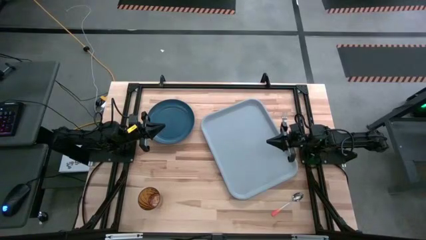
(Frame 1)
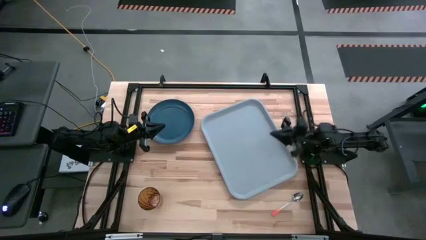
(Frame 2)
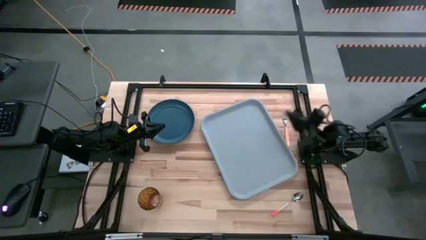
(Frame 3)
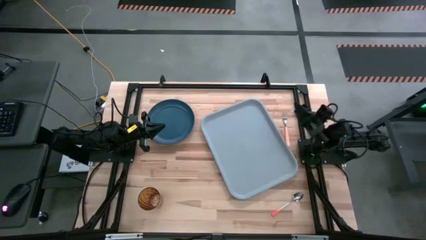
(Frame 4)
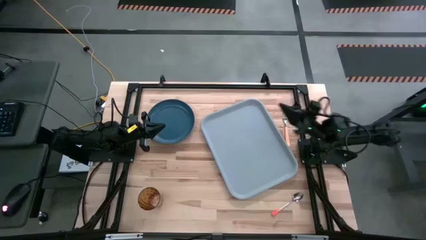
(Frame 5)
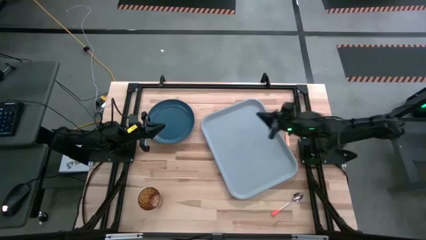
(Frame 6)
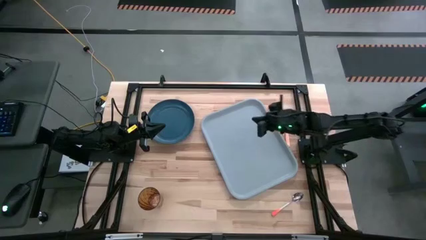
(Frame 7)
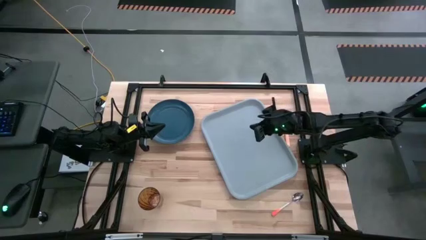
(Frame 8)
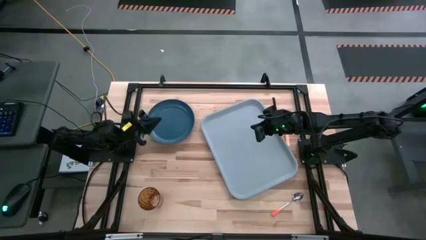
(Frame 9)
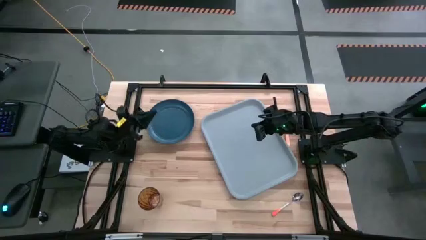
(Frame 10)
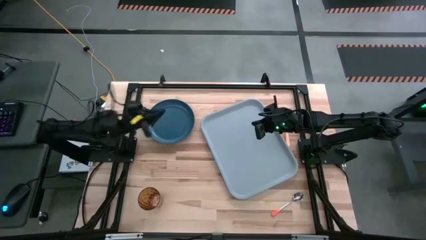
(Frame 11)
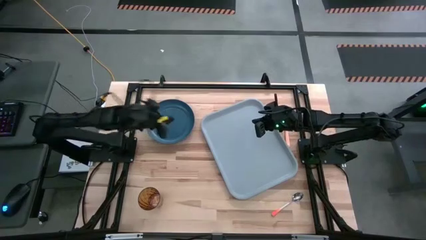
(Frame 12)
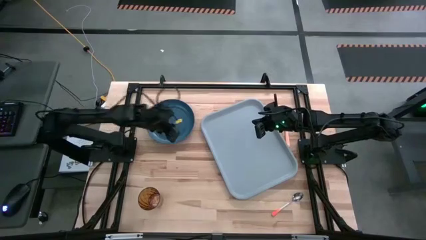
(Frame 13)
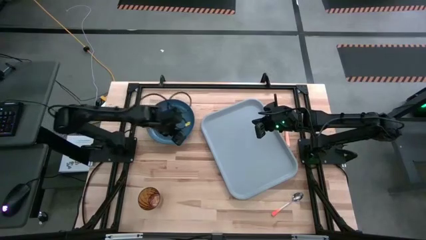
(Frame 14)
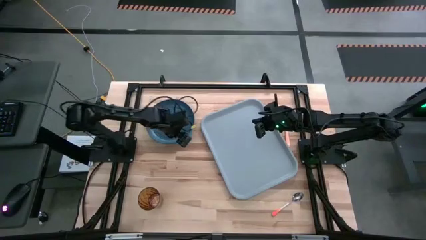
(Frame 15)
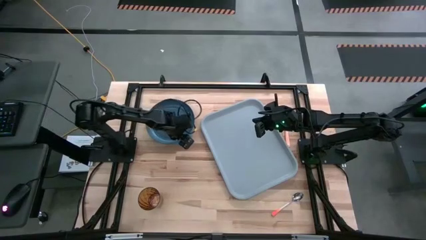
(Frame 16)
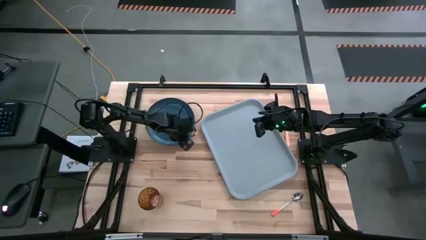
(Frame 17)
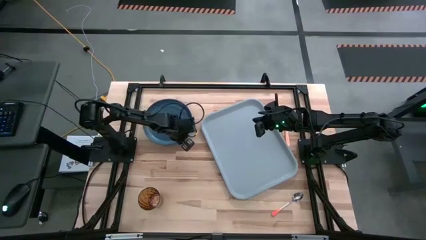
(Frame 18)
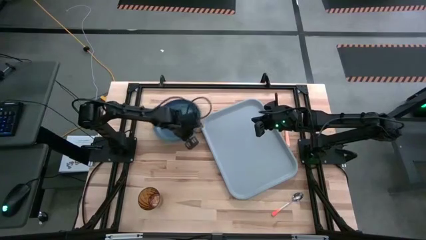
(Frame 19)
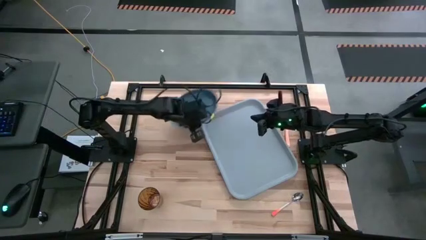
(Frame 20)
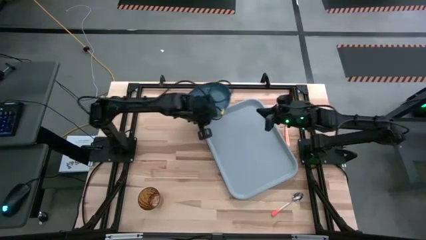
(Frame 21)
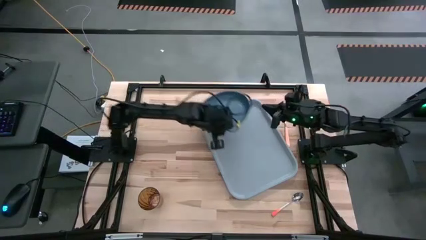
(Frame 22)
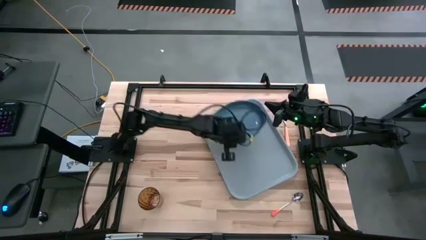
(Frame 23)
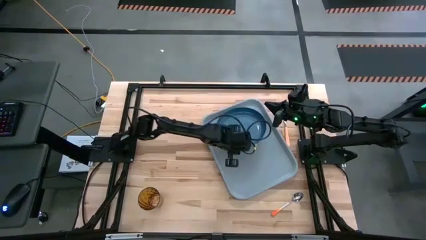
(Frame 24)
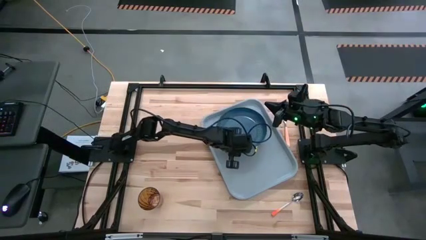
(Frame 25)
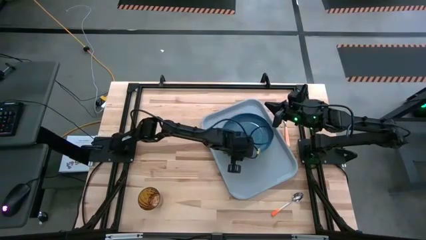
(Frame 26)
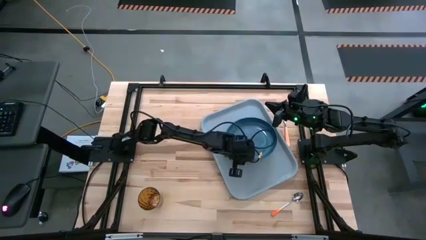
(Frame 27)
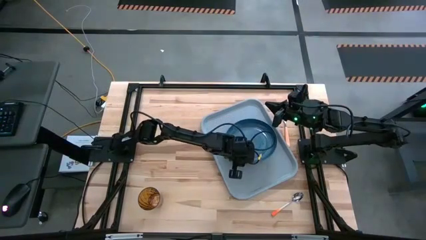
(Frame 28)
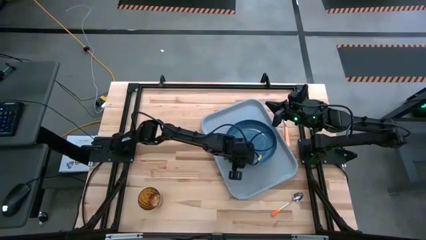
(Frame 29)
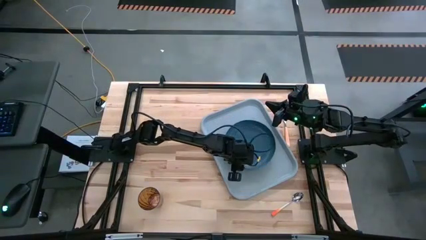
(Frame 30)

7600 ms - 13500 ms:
Task: Pick and place plate/cup/fork/spoon on tray
Put the dark blue plate on the center of the gray tray

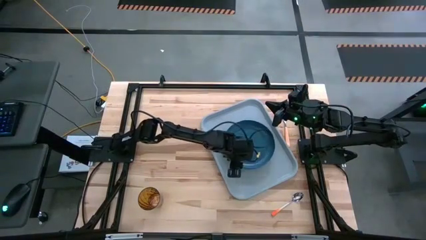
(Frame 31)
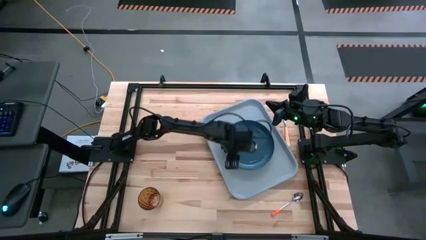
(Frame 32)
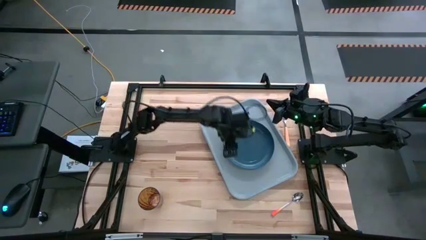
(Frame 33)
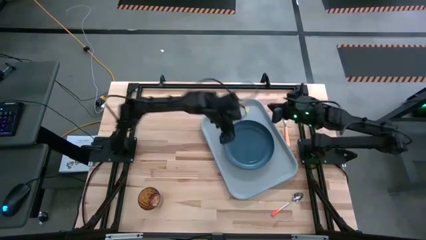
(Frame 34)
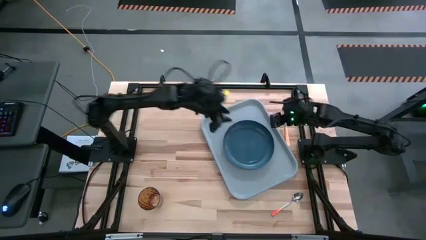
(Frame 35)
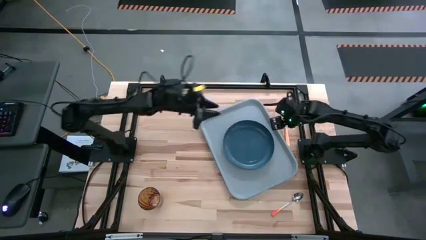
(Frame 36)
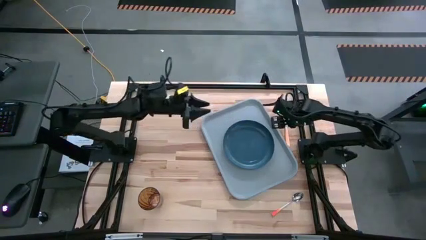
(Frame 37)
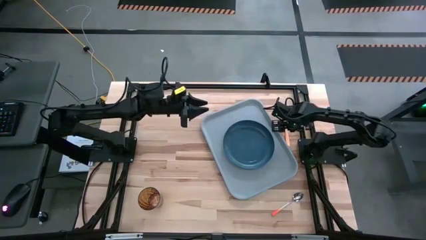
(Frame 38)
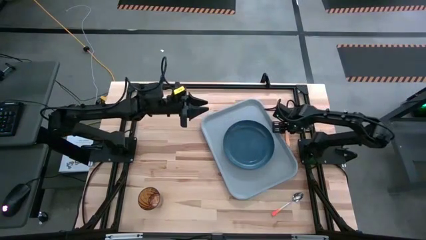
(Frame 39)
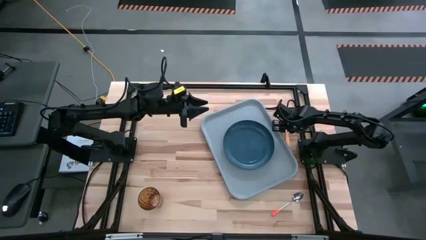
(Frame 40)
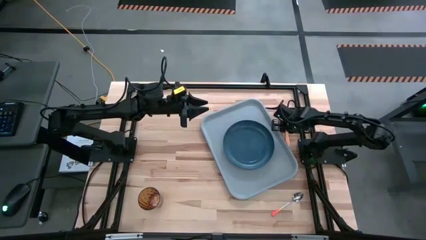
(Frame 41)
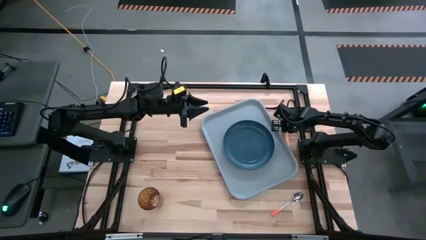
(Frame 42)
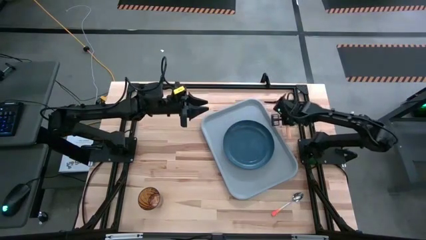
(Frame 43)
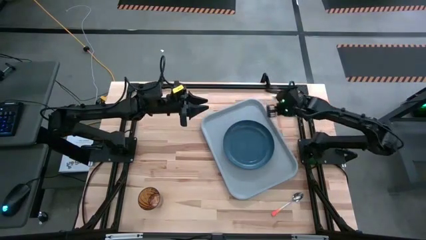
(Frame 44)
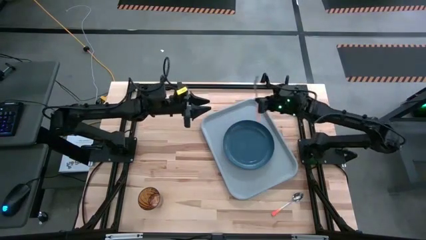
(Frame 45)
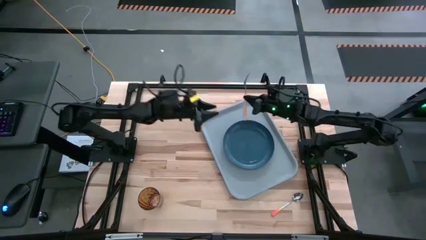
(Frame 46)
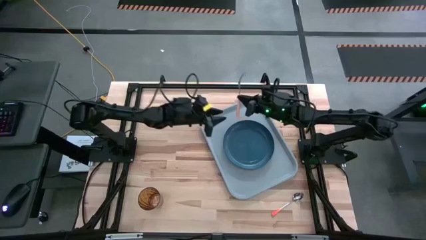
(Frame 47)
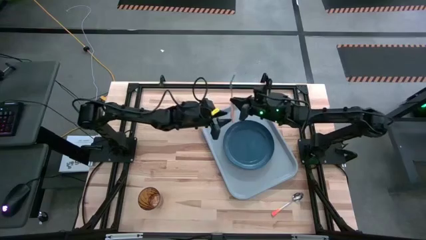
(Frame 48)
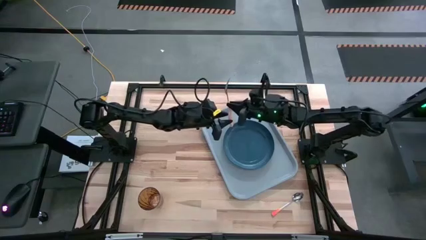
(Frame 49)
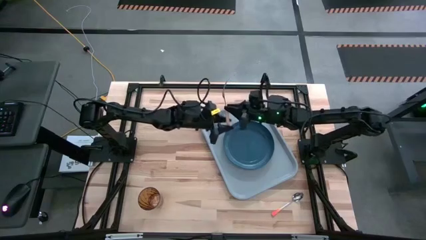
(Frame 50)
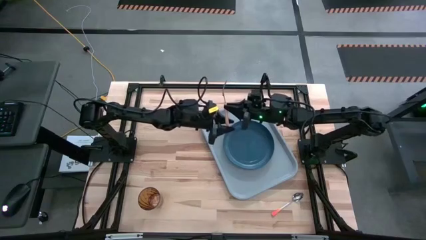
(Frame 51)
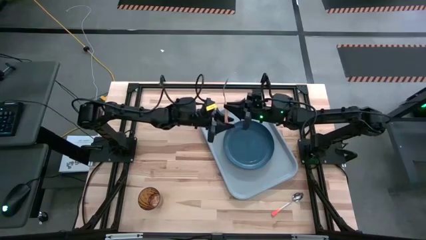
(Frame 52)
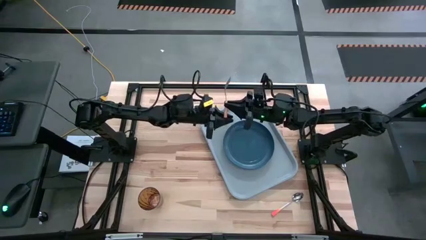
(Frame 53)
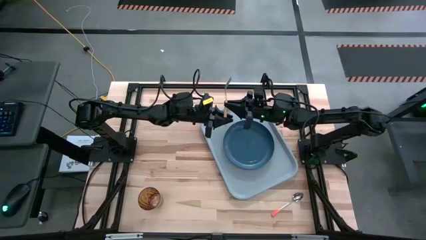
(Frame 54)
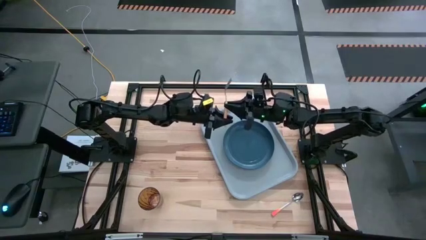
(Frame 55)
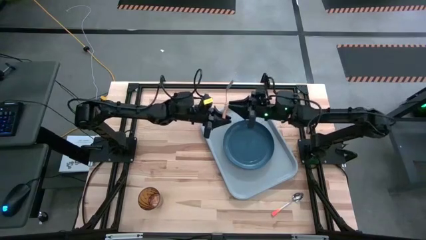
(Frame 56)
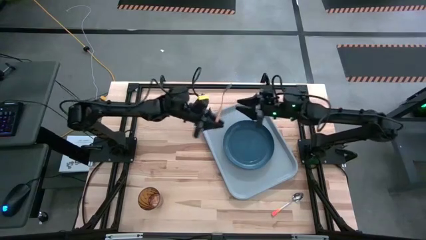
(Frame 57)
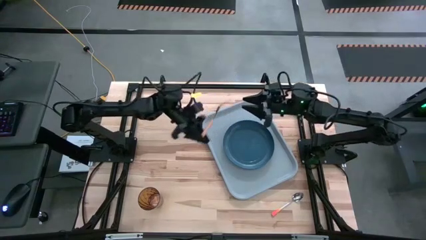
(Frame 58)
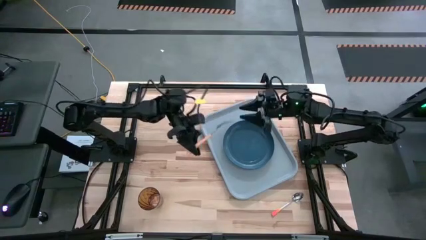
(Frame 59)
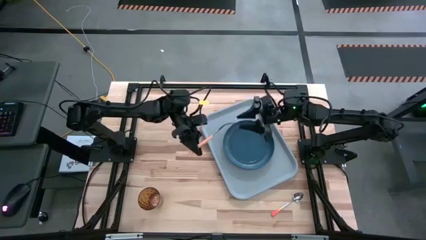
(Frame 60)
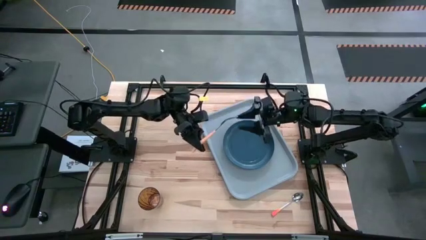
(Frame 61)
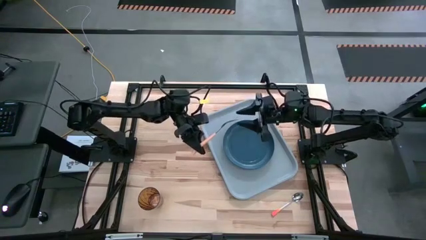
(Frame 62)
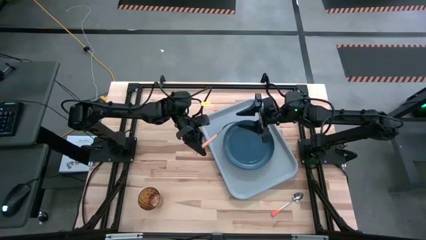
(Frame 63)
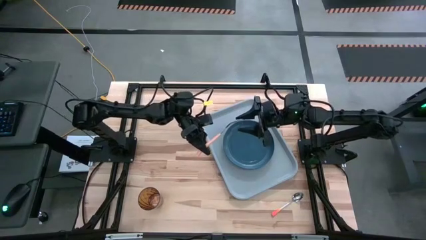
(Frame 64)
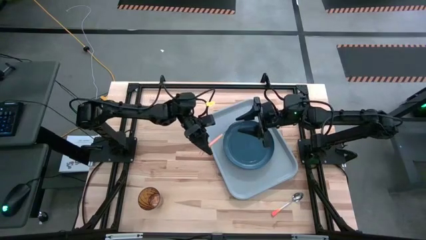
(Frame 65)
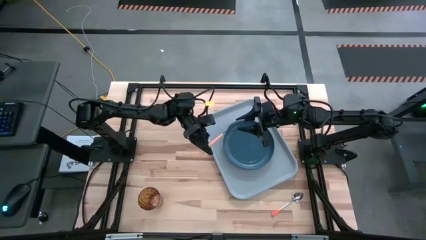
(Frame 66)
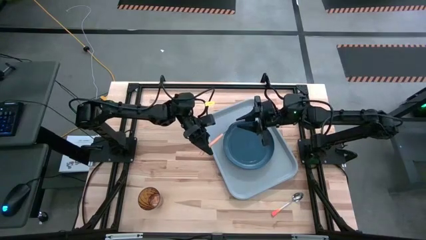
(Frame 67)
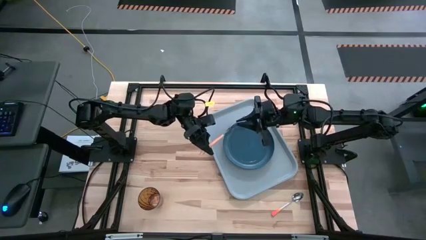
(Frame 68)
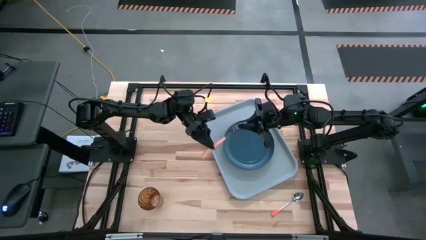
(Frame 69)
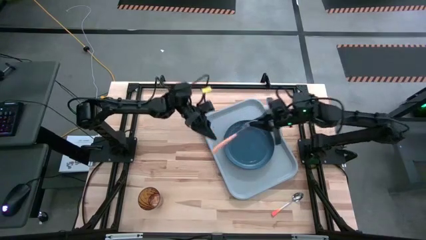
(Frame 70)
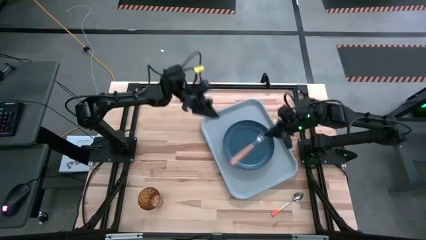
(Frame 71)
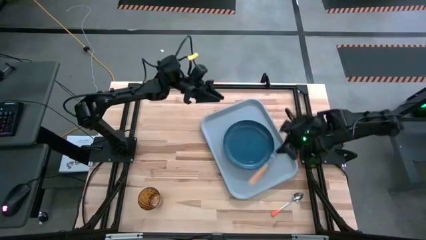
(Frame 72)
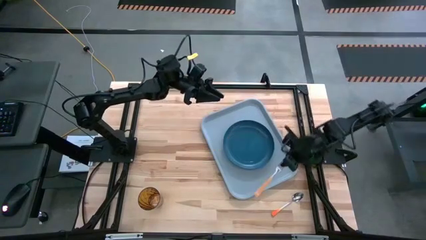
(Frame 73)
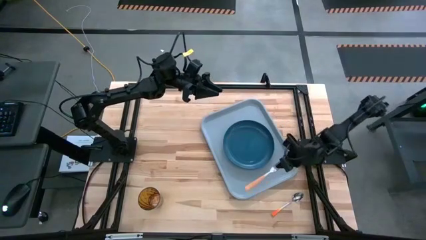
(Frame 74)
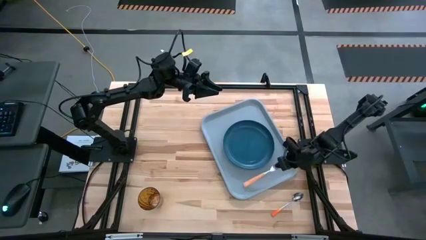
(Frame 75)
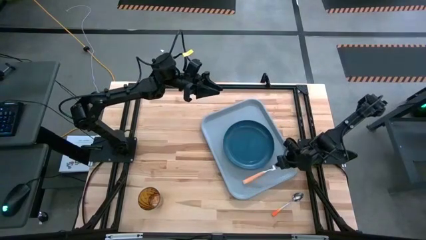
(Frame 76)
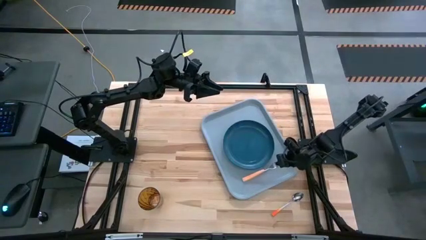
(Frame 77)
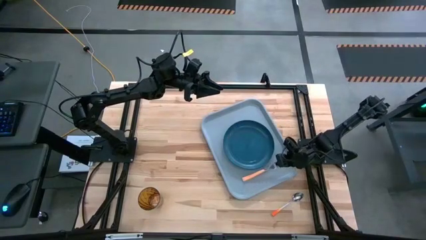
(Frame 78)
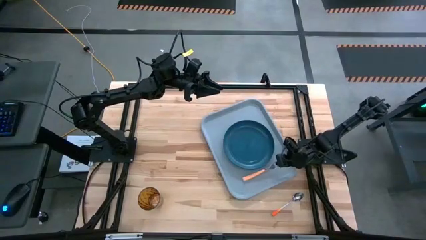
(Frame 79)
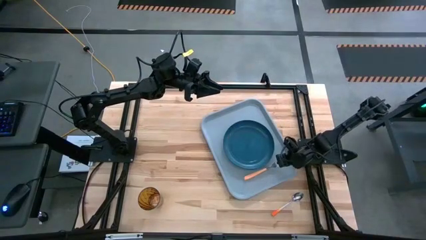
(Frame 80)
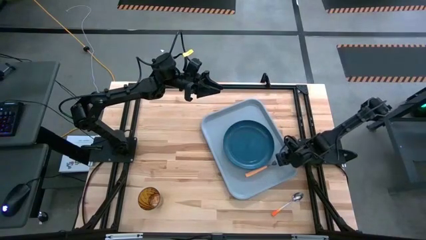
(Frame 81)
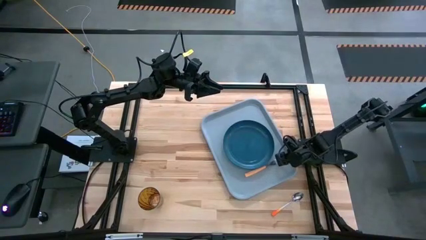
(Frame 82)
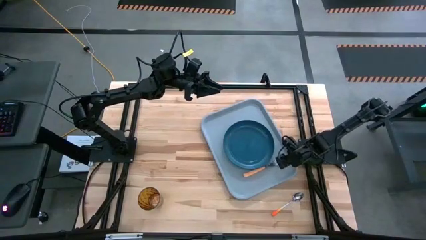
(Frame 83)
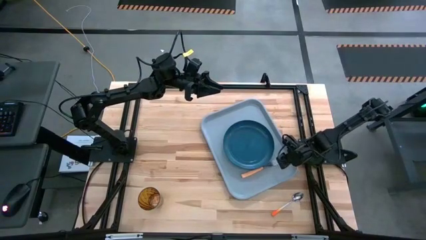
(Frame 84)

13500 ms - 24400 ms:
Put the orange fork on the right side of the dark blue plate

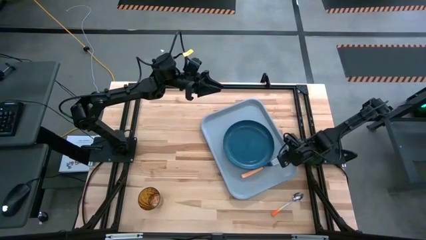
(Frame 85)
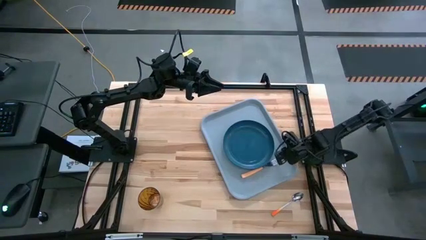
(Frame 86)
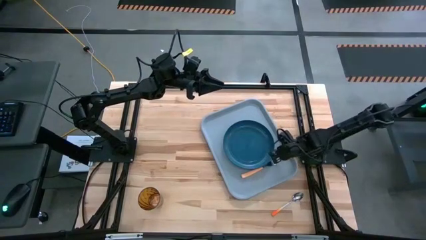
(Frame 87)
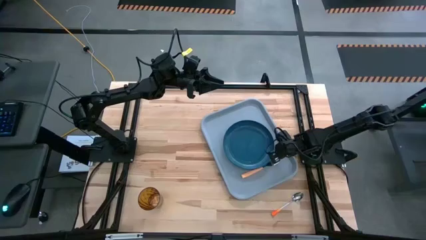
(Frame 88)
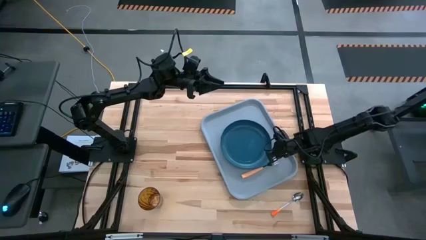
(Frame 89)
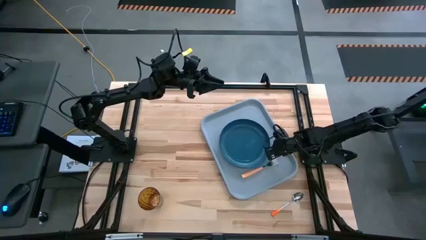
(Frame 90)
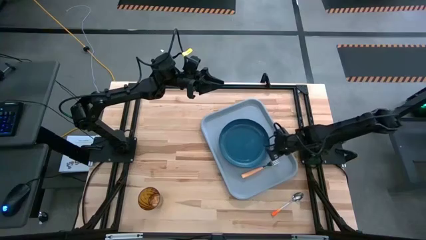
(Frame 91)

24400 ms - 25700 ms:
Adjust the dark blue plate
